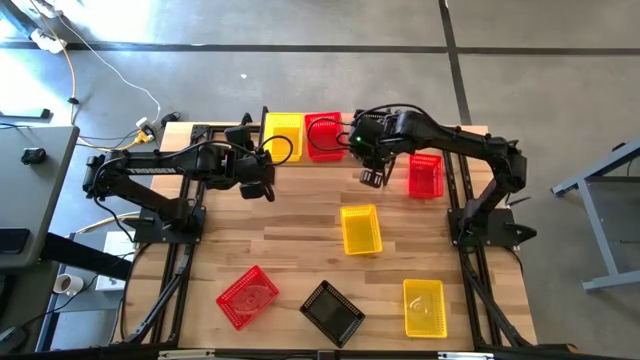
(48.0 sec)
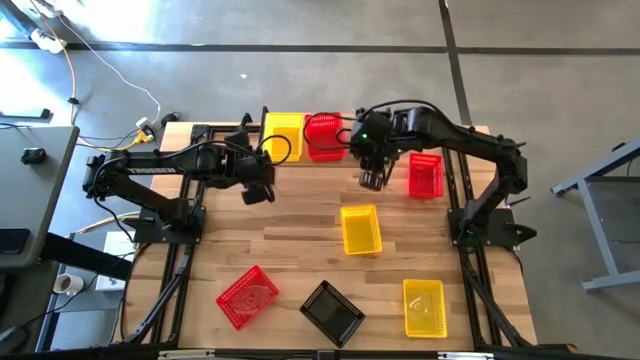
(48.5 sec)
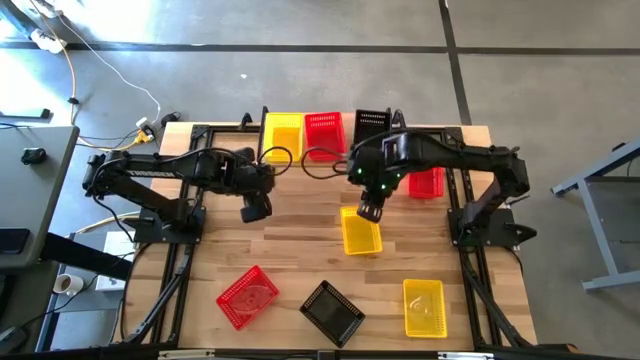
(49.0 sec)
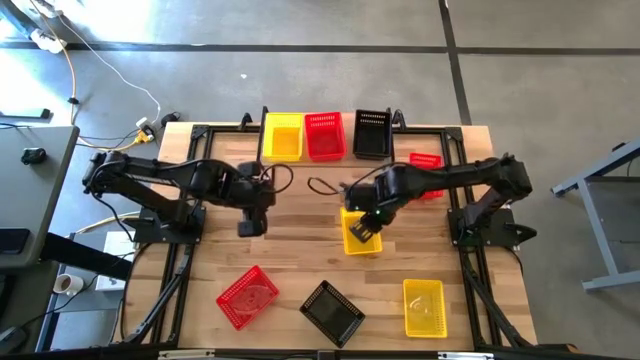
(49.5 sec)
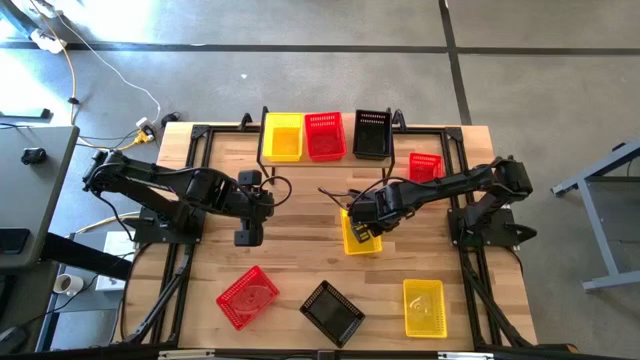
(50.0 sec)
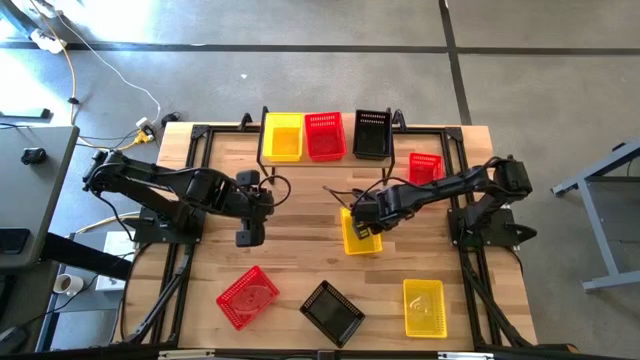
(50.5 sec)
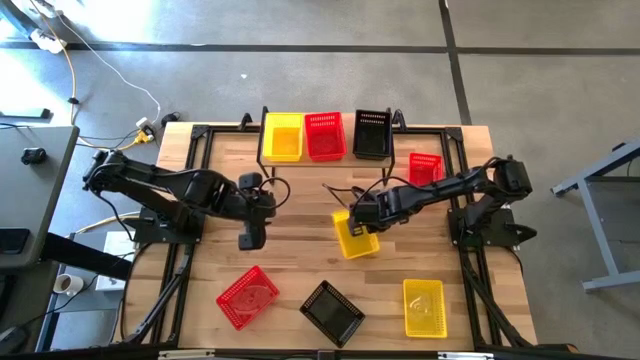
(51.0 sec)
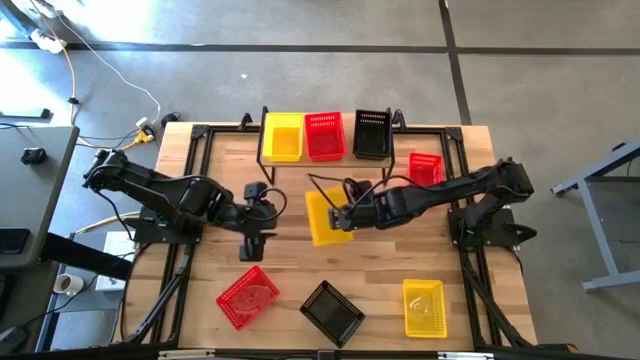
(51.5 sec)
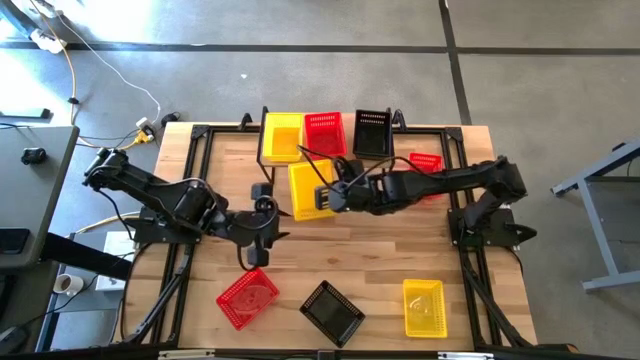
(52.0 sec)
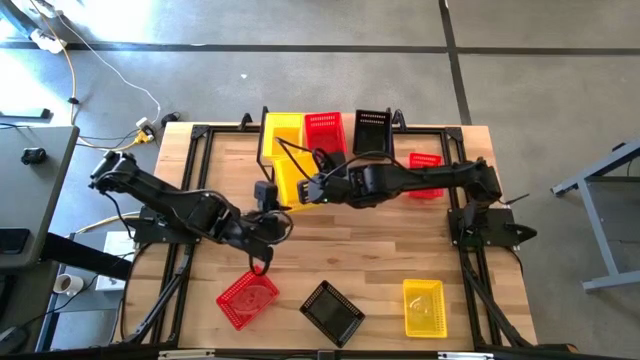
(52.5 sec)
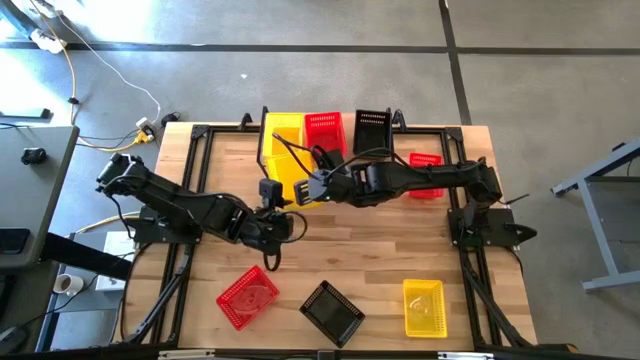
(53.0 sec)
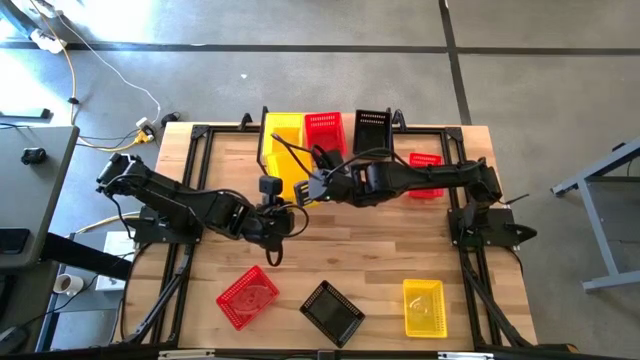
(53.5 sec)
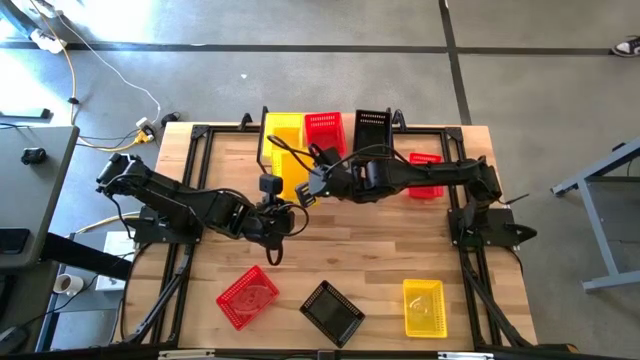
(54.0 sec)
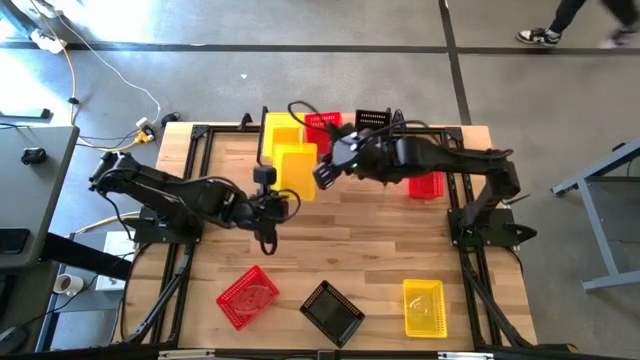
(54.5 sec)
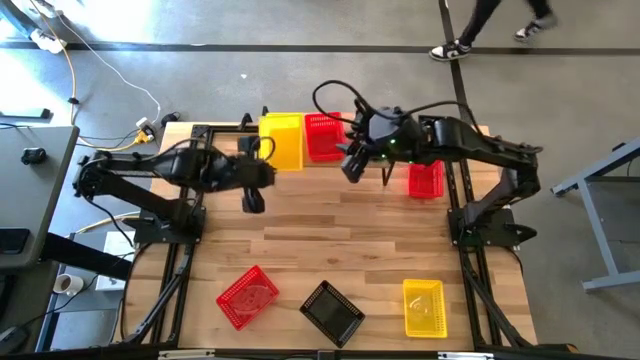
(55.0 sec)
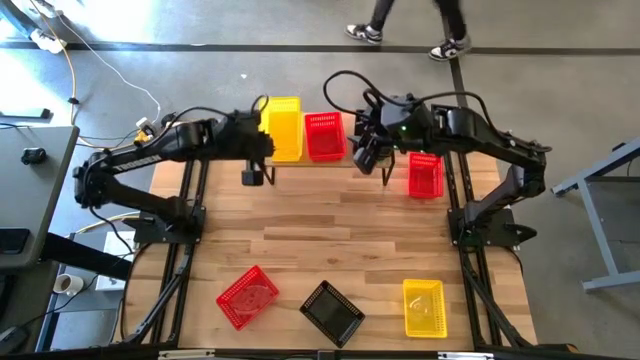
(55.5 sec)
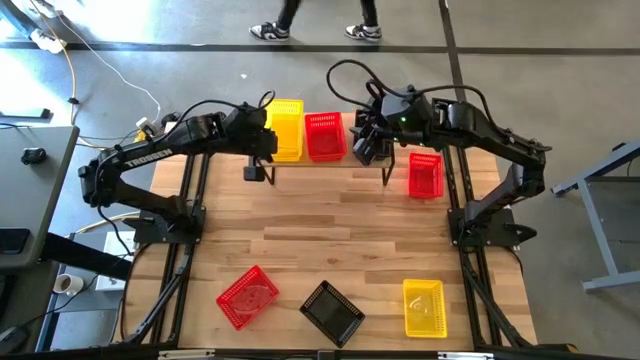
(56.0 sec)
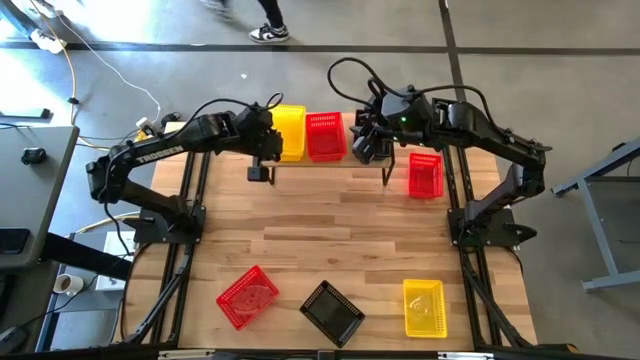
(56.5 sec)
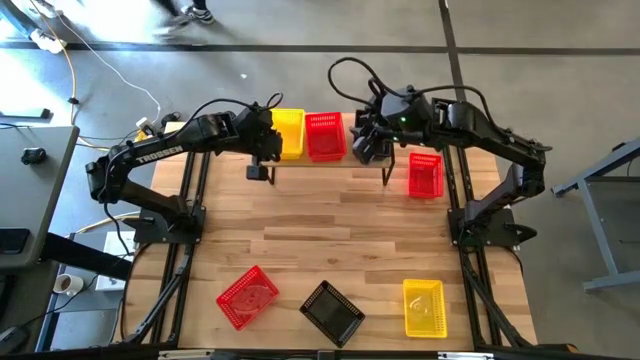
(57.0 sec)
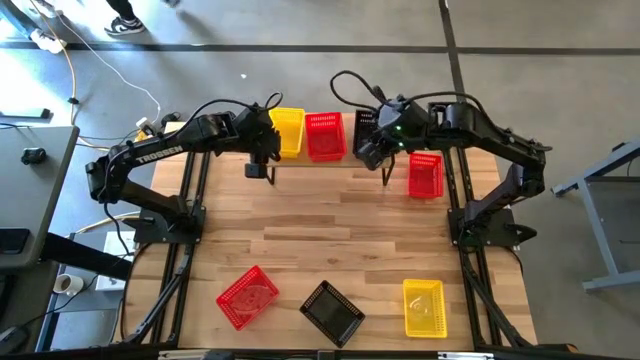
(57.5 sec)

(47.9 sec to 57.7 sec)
Task: Stack baskets on shelf by color
Stack the top yellow bin on the yellow bin on the shelf

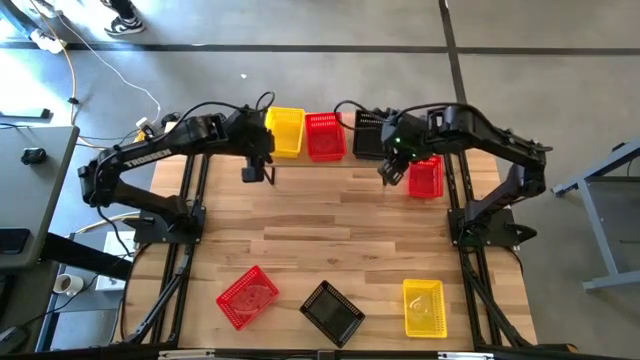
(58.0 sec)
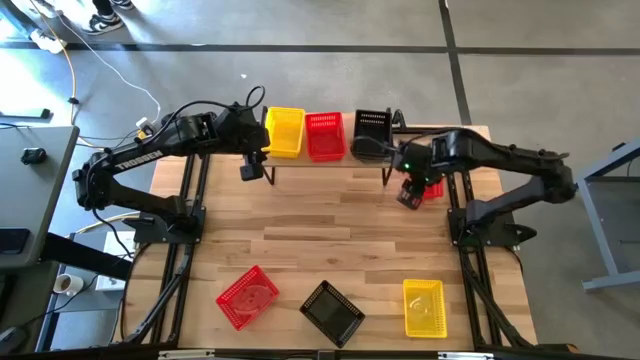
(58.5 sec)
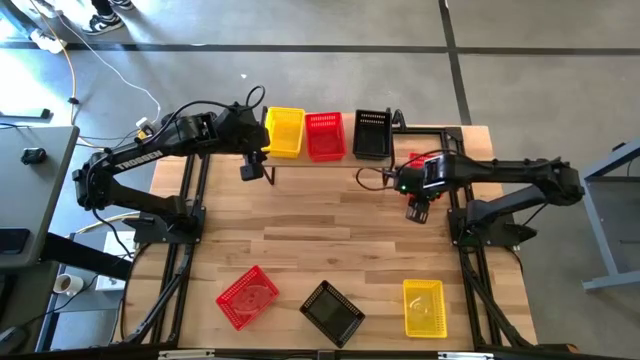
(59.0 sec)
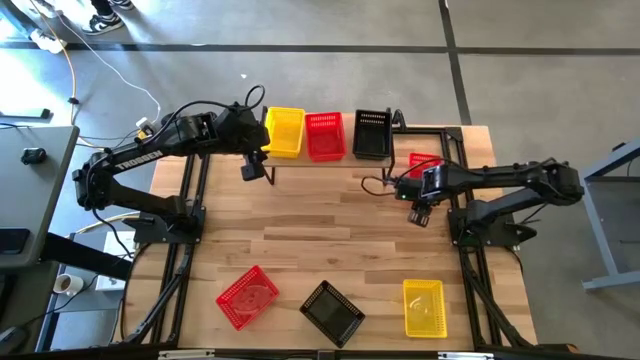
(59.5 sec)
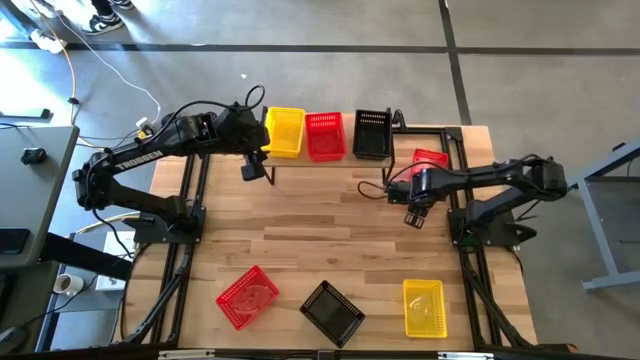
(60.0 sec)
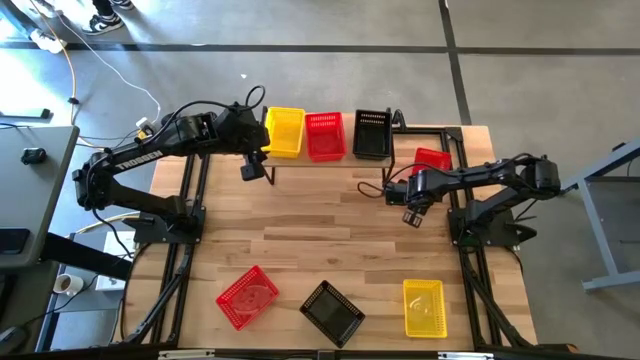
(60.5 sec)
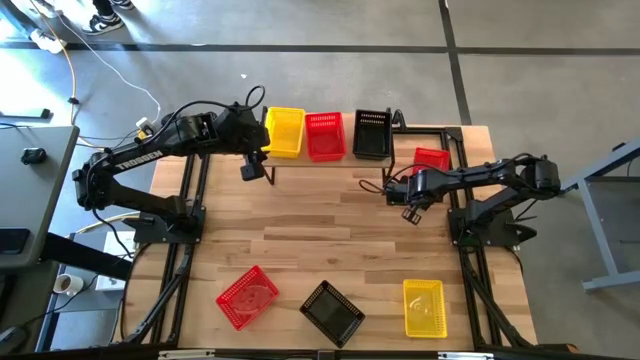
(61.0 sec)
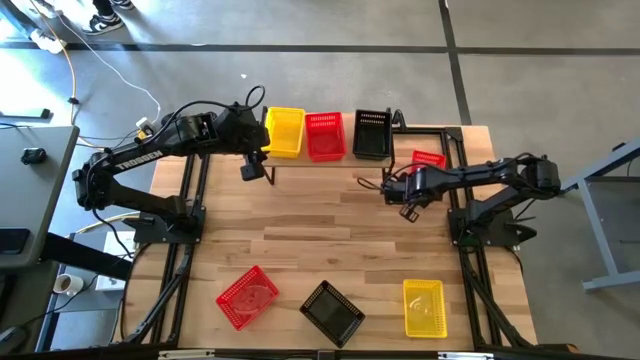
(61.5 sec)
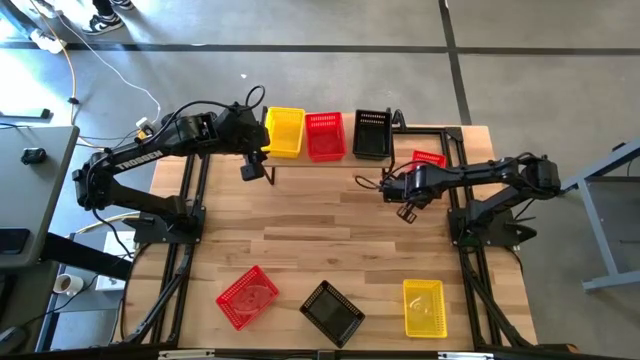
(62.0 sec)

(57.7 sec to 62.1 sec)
Stack the top red bin on the red bin on the shelf

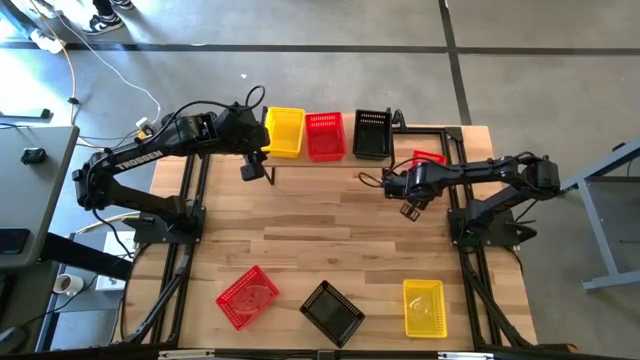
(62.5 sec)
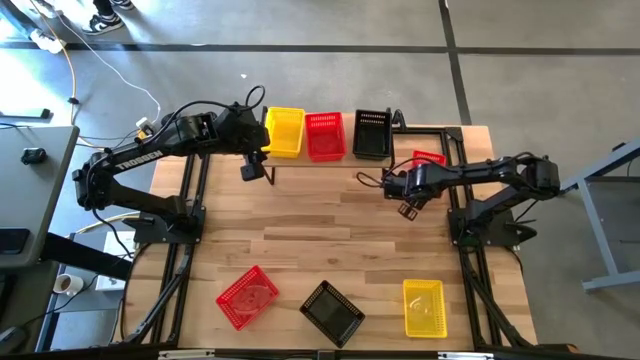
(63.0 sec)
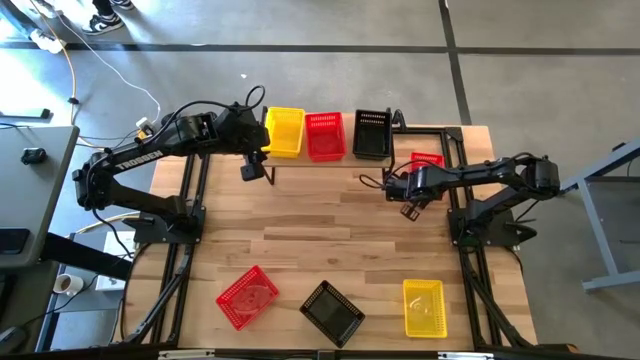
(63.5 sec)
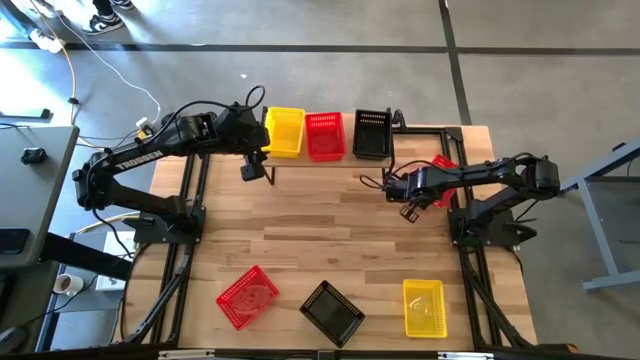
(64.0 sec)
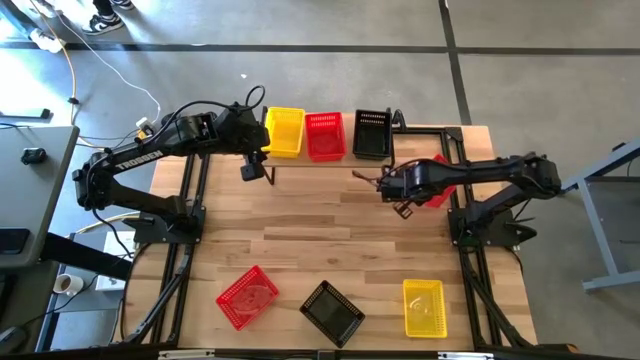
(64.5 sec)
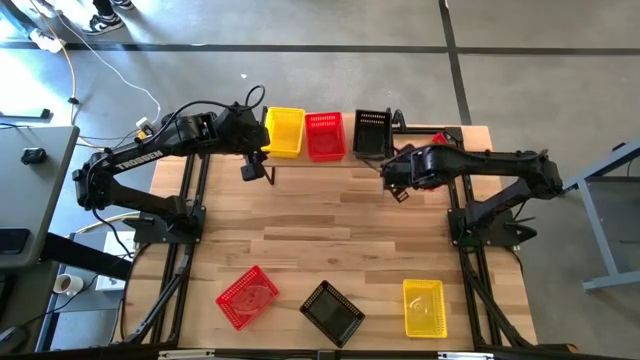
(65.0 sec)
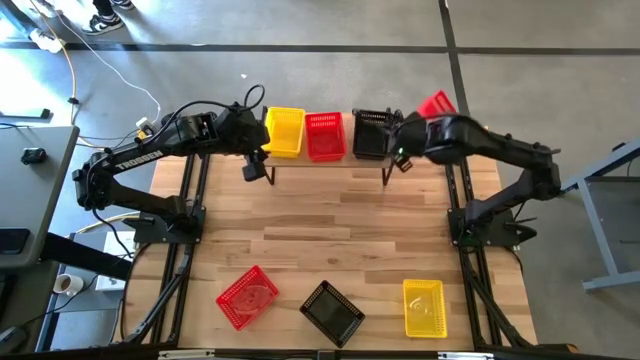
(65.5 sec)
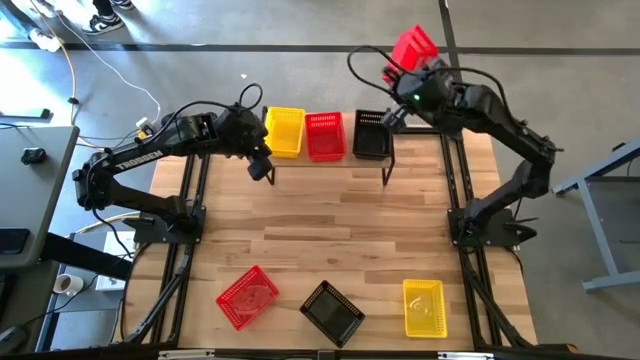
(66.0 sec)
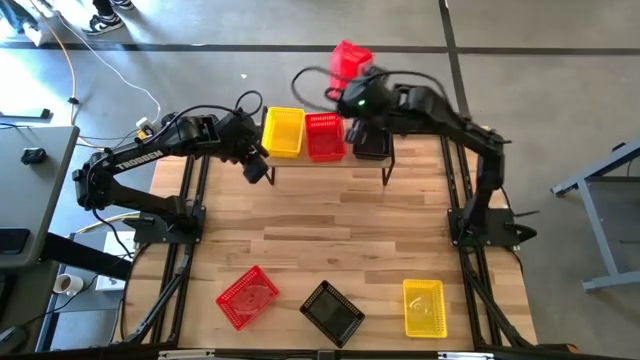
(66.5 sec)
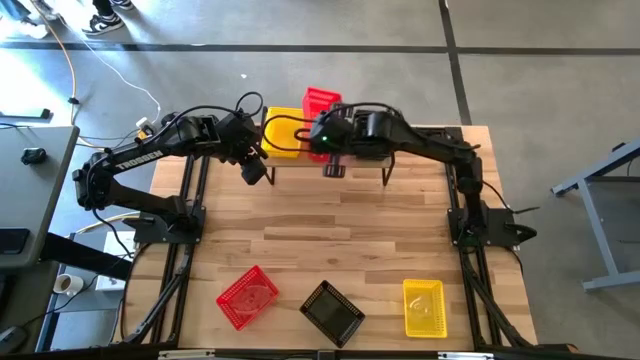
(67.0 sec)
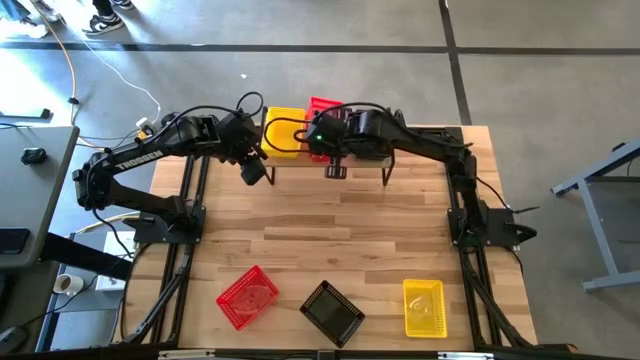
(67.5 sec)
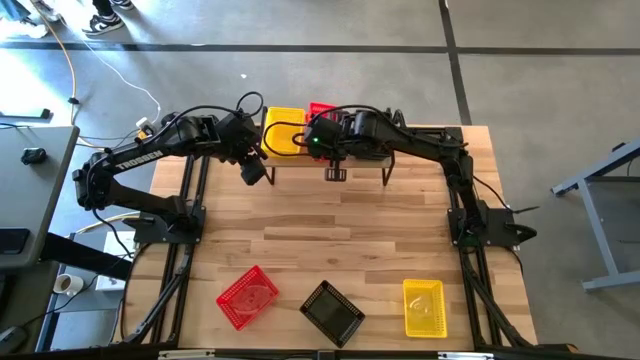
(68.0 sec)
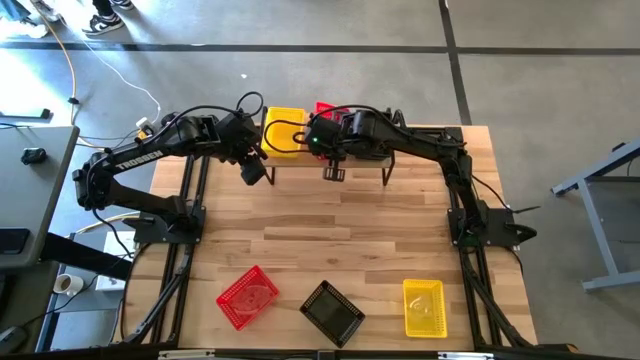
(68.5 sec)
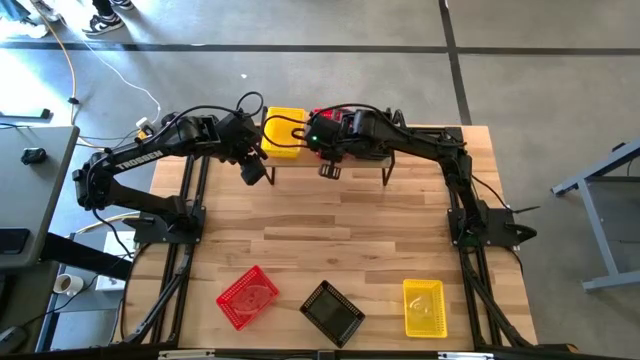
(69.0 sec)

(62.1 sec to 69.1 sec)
Stack the top red bin on the red bin on the shelf
